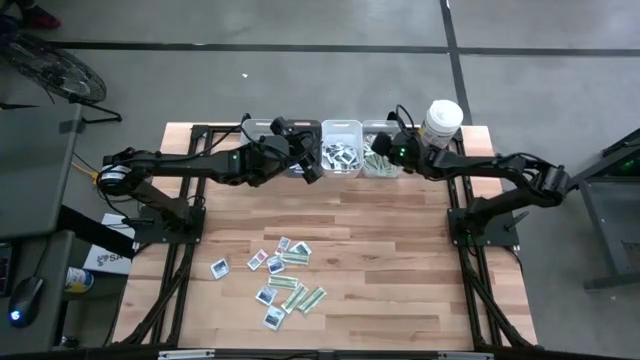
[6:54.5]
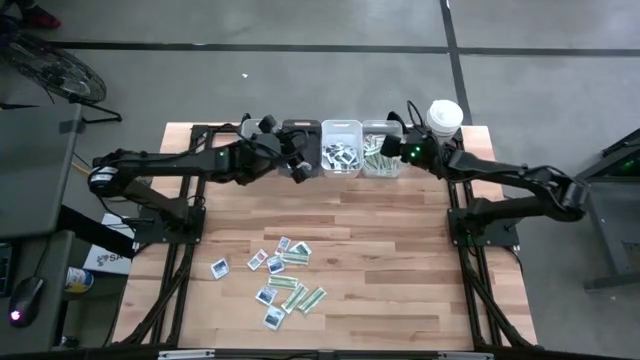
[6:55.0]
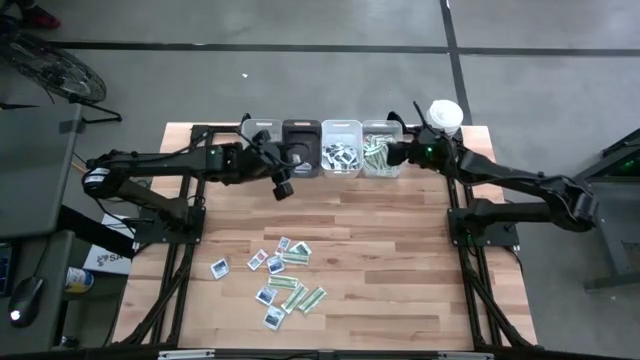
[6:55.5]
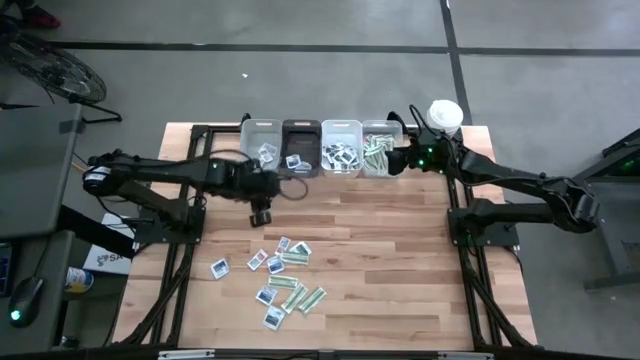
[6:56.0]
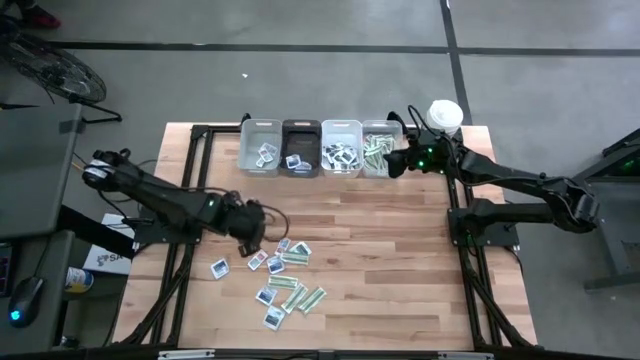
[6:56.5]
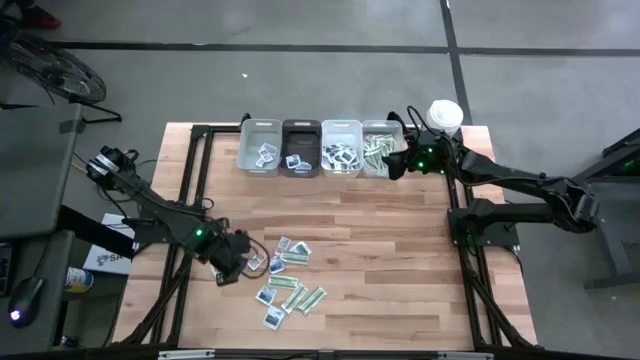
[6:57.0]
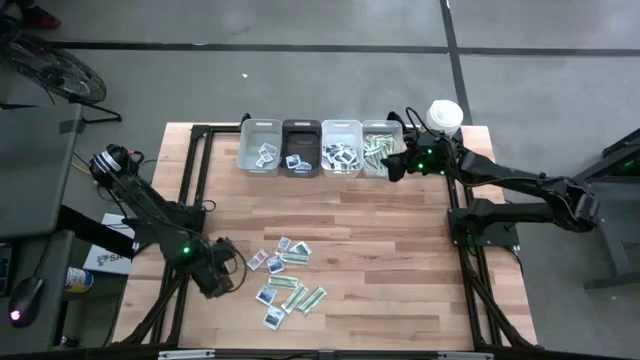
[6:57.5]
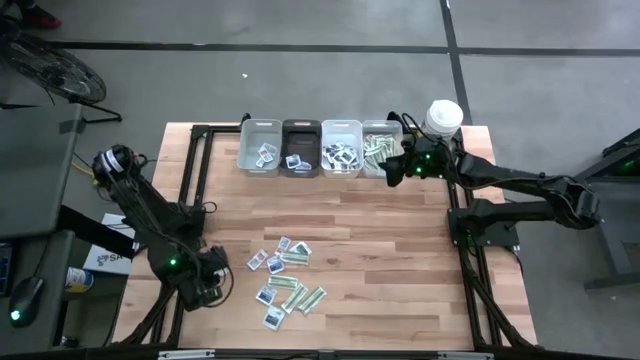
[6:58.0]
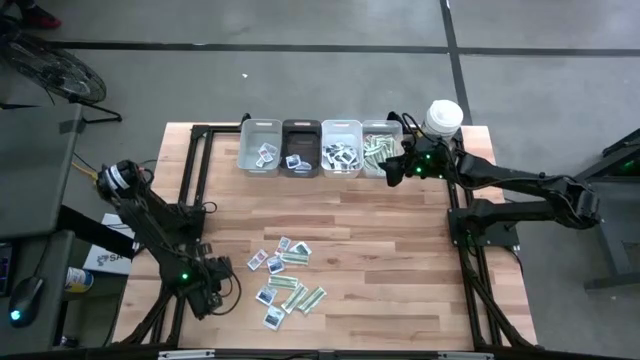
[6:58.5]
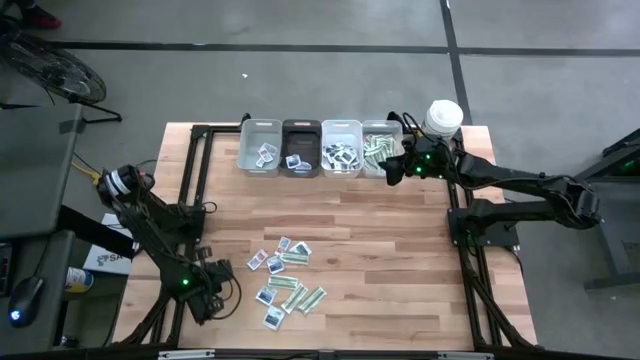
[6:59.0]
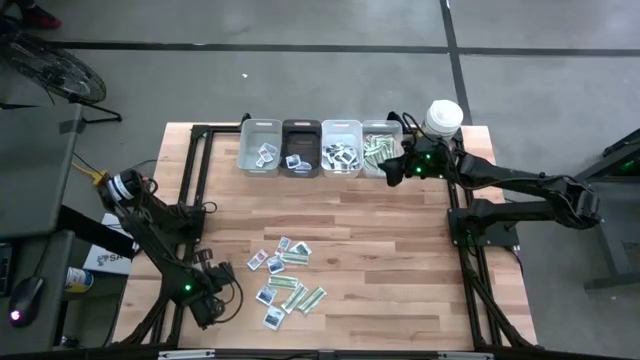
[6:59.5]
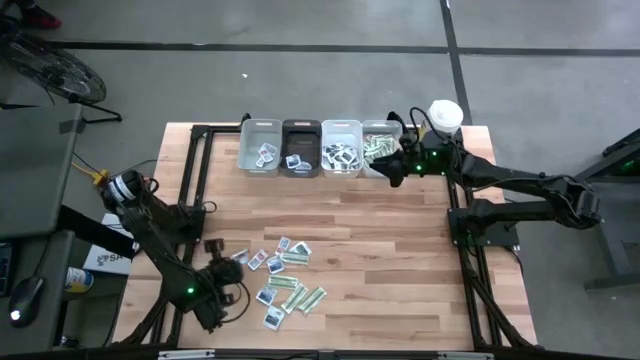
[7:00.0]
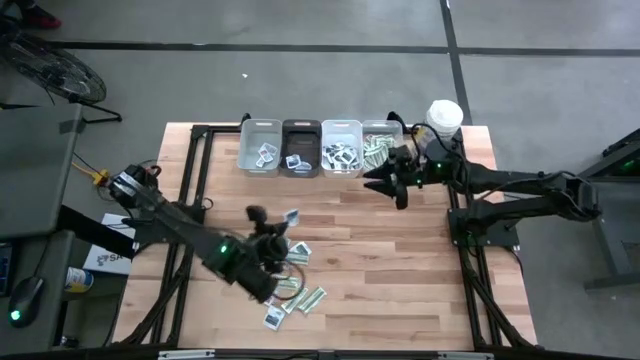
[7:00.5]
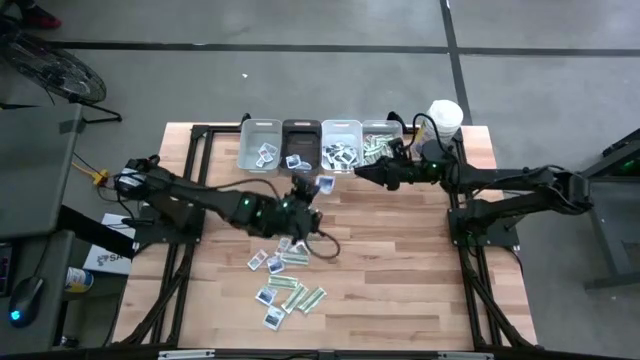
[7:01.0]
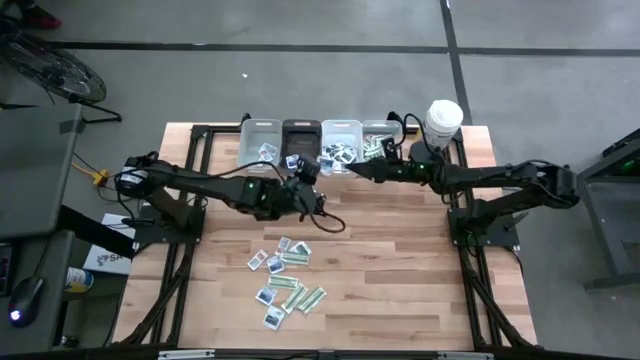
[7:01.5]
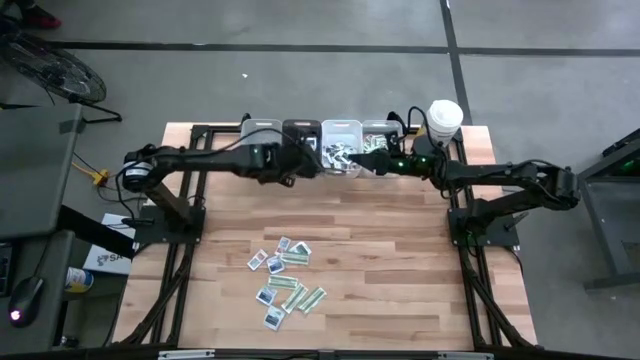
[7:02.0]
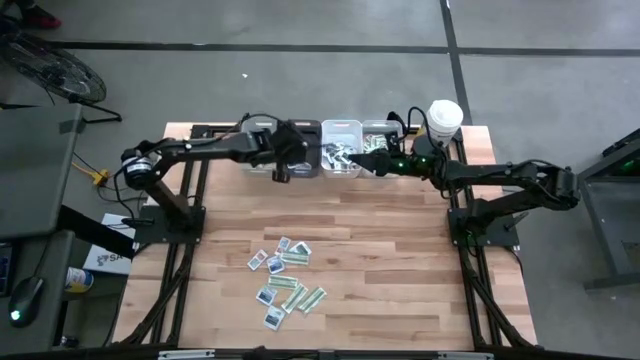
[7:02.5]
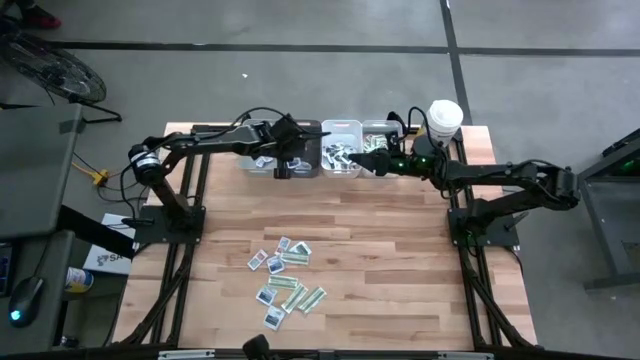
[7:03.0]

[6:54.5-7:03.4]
Task: Pick & Place First Aid Supplies
Put the blue alcohol pad into the black bin

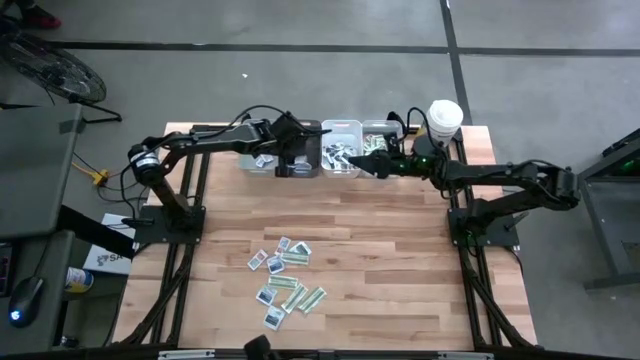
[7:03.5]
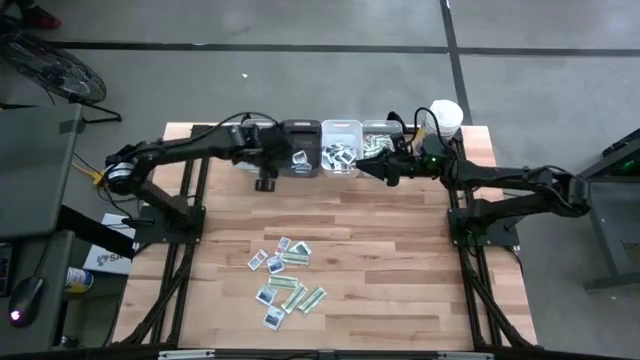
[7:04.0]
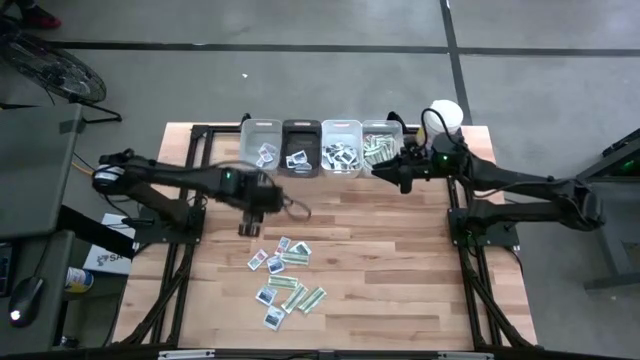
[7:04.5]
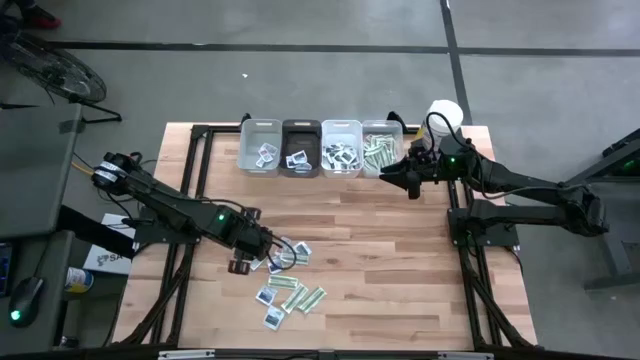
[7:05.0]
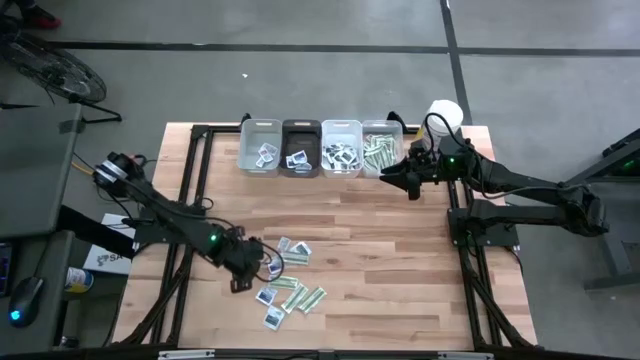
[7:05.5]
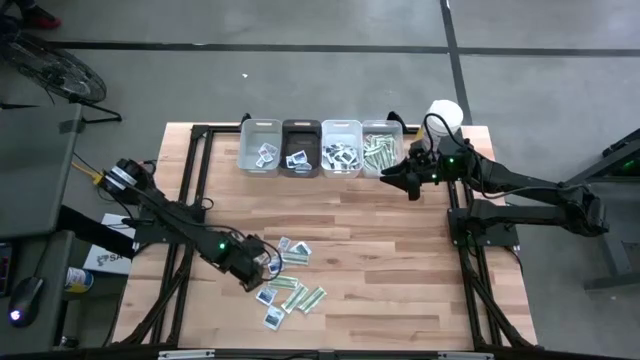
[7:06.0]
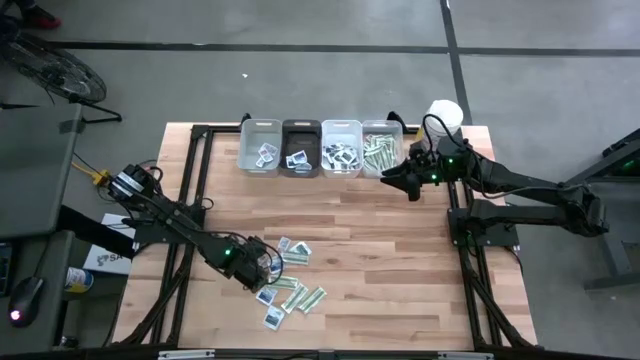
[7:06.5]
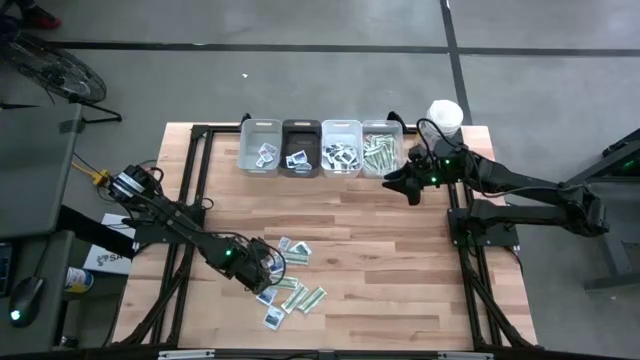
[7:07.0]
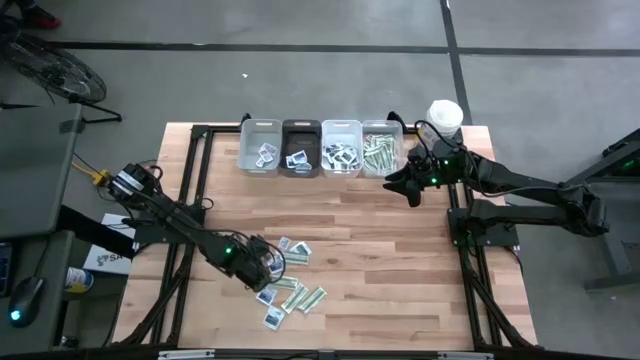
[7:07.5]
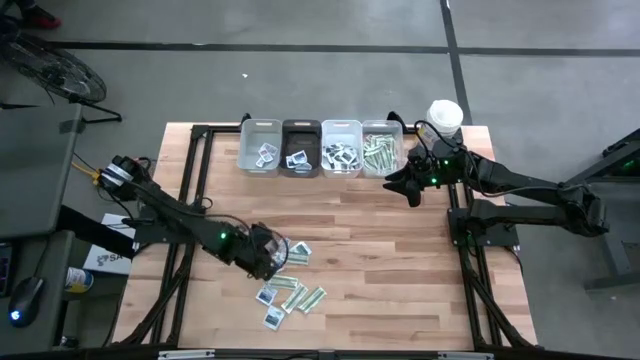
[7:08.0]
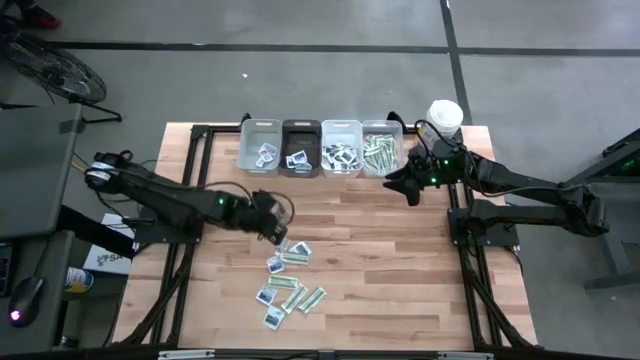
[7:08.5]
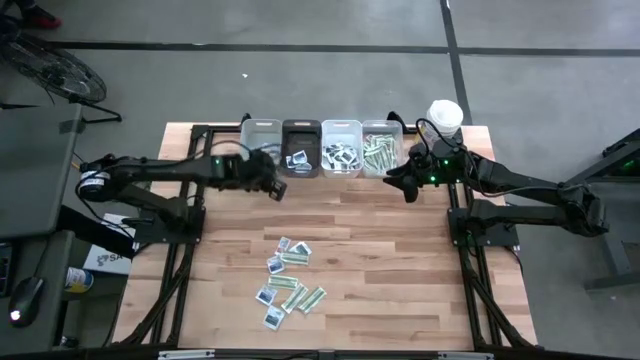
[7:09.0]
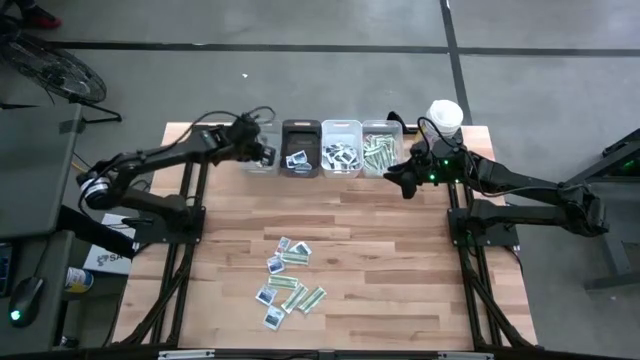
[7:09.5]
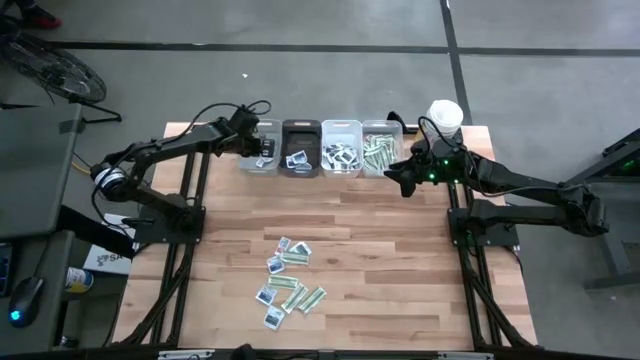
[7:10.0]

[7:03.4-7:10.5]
Put the orange ointment pack into the gray bin

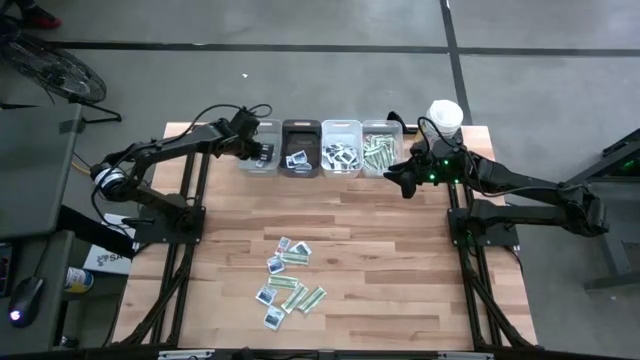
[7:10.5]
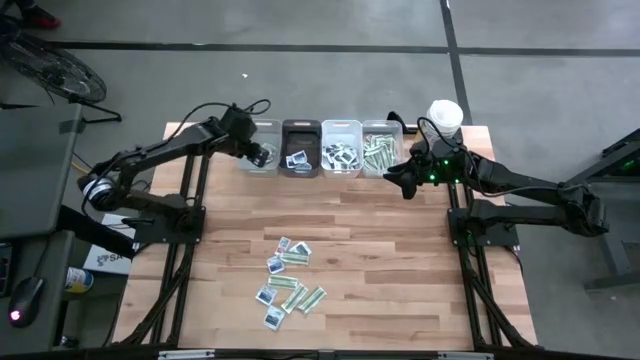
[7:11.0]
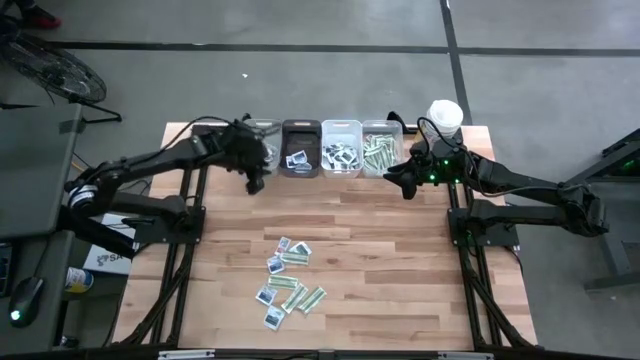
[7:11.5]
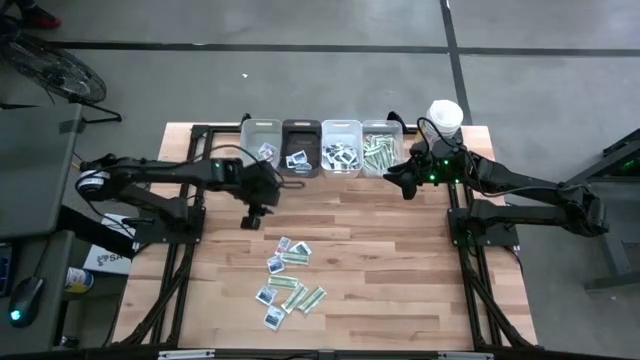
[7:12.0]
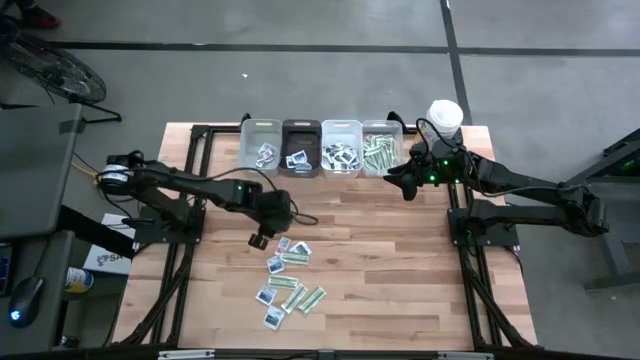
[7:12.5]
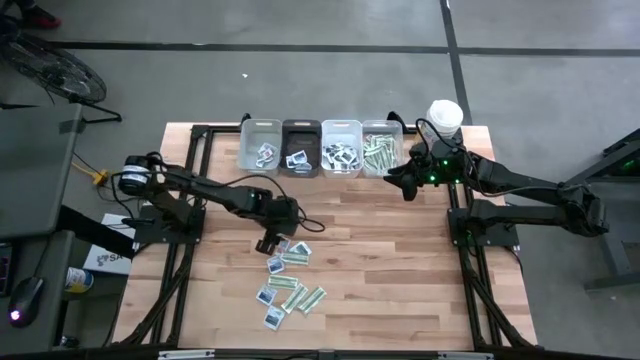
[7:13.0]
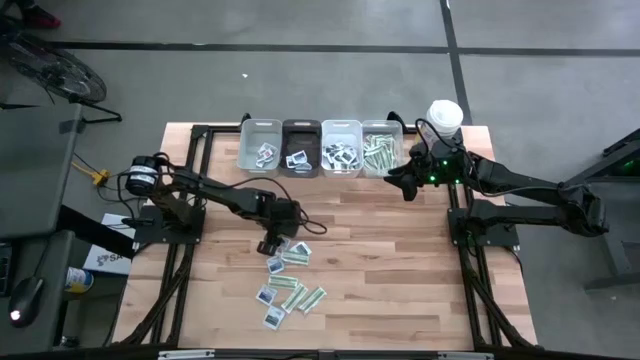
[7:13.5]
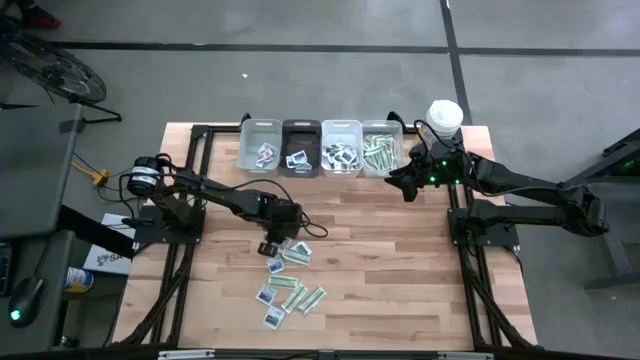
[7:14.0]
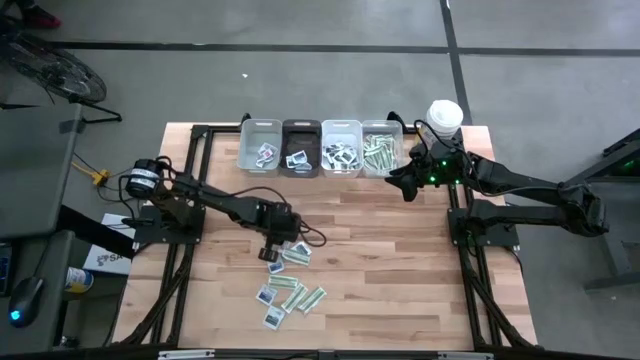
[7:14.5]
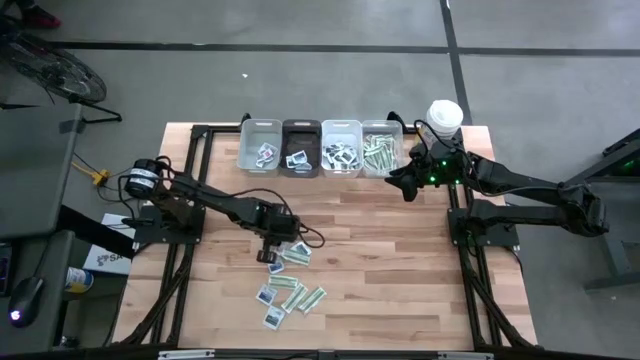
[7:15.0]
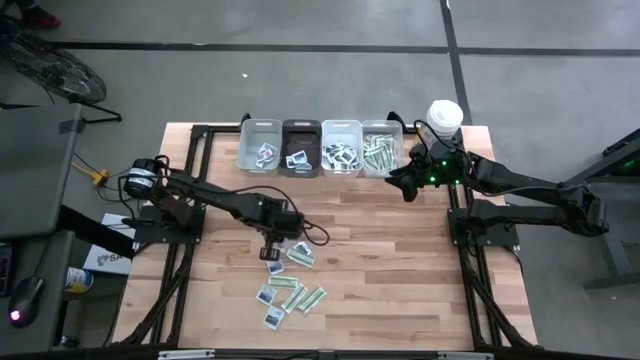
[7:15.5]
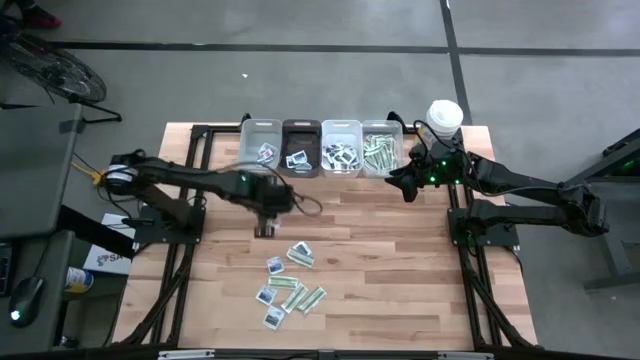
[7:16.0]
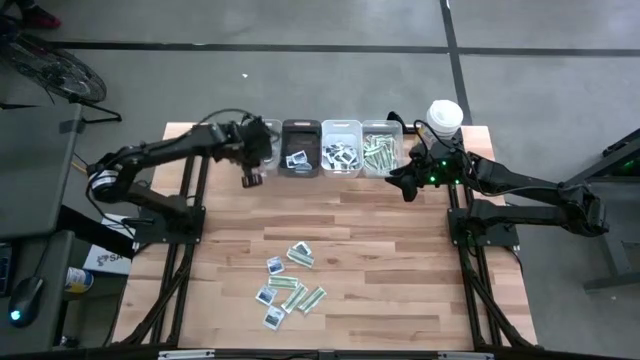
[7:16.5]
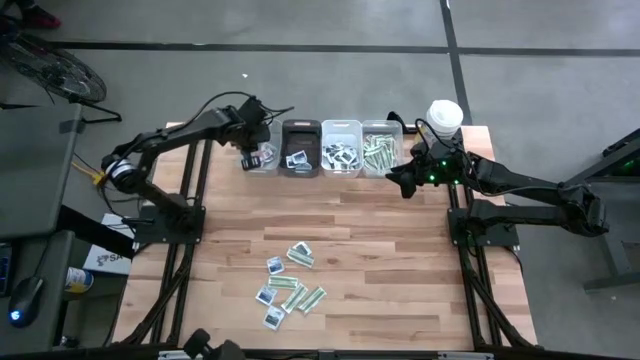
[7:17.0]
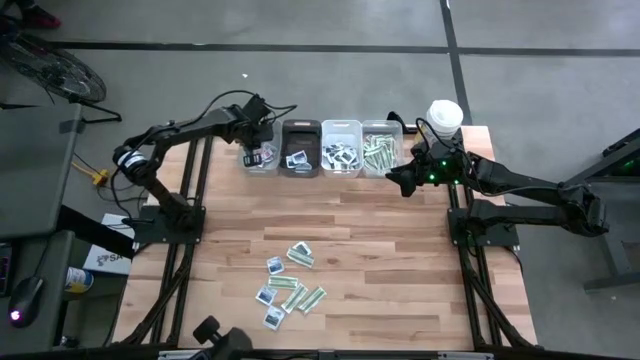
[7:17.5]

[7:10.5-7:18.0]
Put the orange ointment pack into the gray bin
